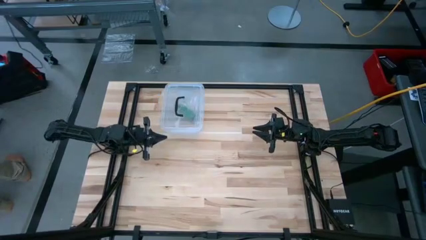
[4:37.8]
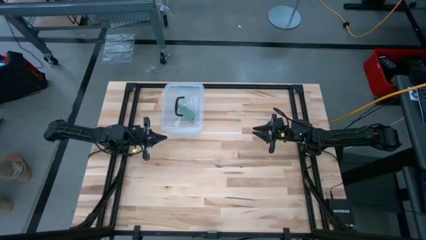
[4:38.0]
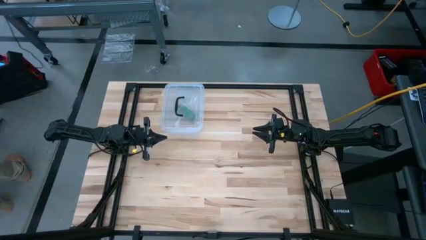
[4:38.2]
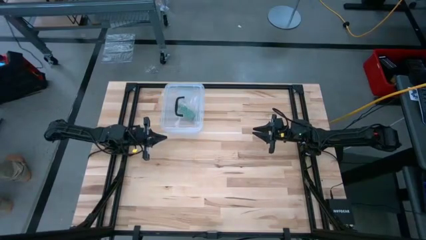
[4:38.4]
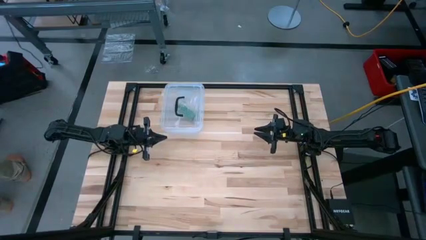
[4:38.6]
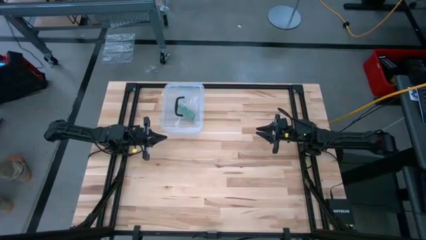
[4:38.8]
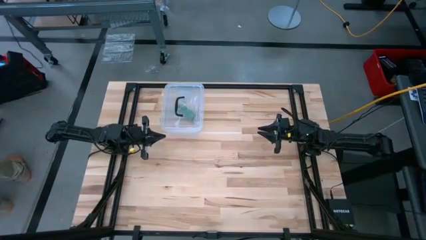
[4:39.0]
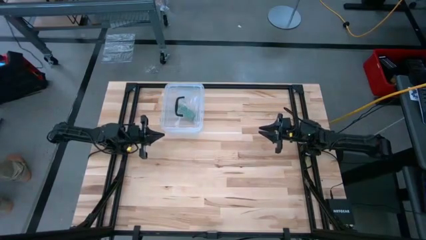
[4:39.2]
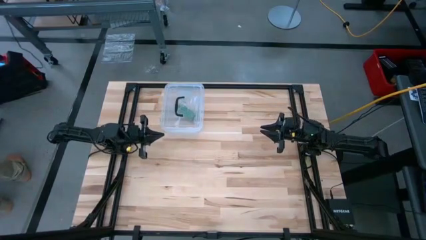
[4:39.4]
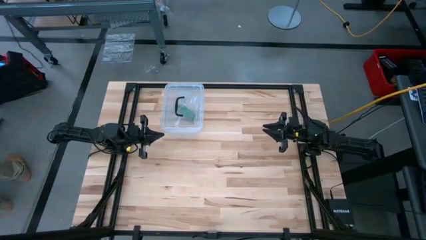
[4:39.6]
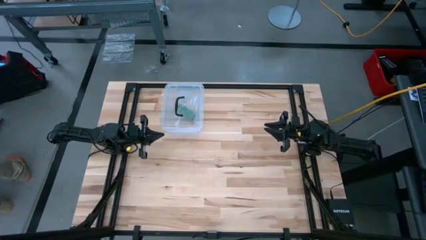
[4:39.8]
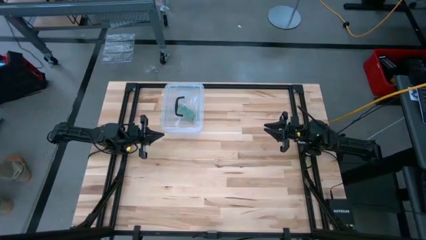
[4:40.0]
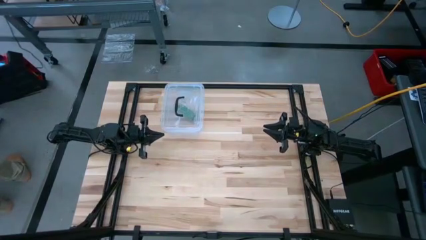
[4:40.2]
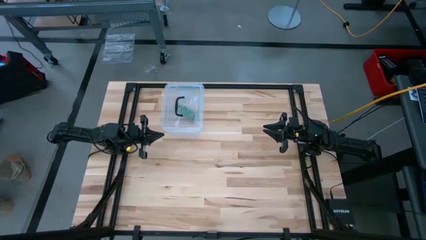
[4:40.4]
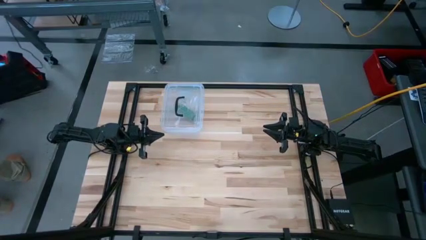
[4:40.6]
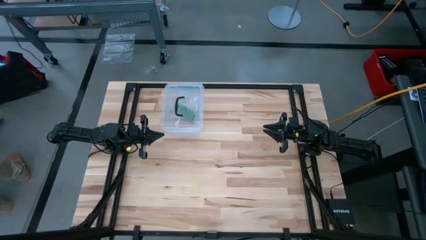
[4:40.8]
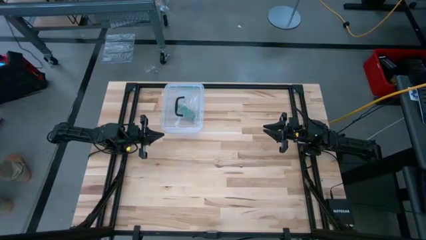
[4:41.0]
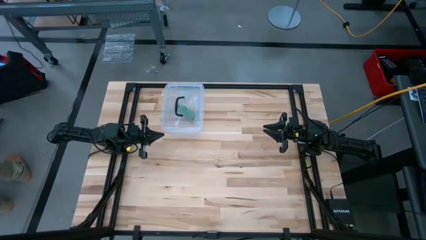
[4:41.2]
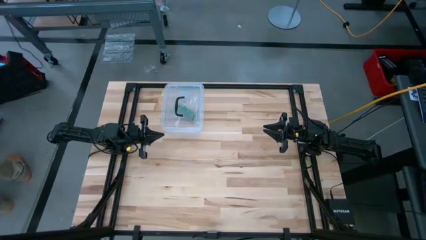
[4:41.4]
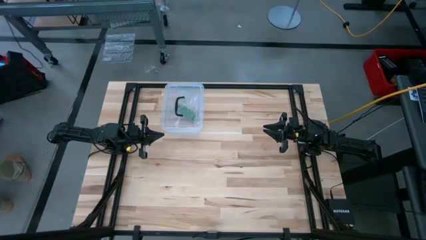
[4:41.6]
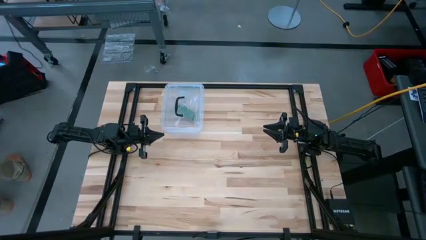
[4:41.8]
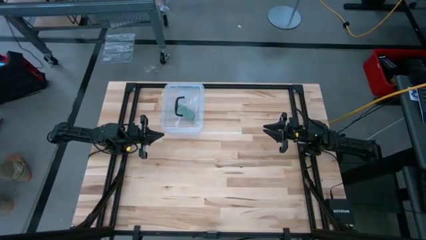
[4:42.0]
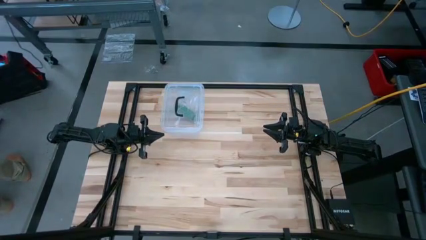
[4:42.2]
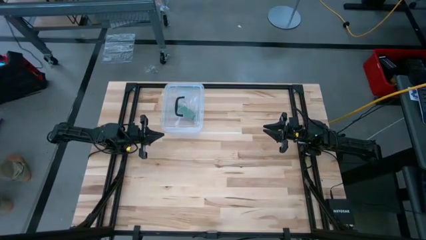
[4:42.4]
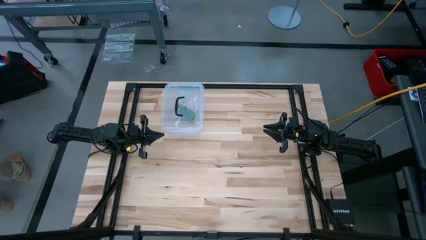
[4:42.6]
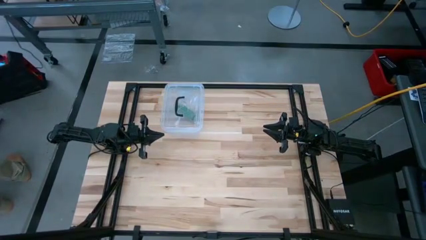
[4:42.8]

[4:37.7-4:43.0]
Task: Roll bandage
Return to Home Position

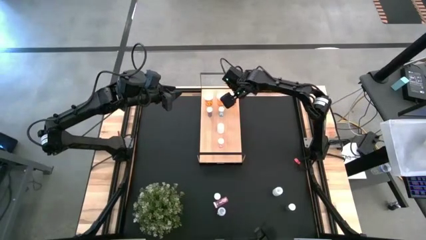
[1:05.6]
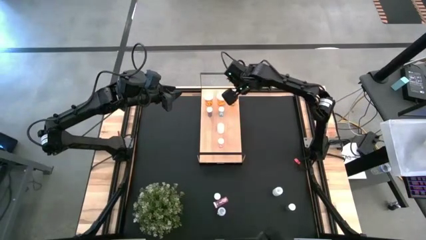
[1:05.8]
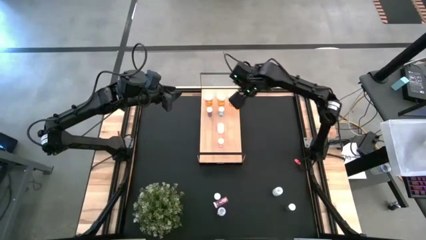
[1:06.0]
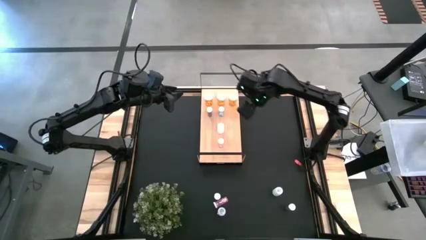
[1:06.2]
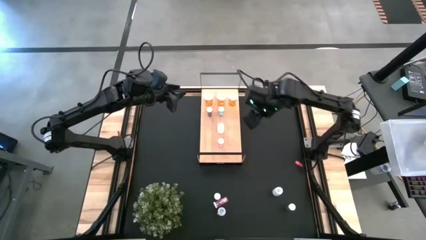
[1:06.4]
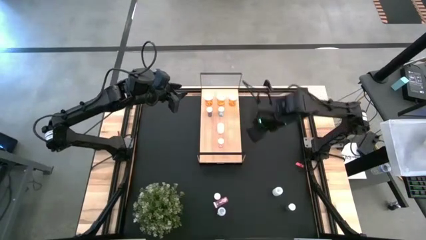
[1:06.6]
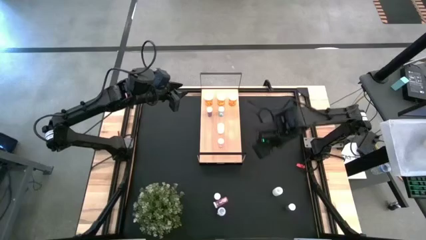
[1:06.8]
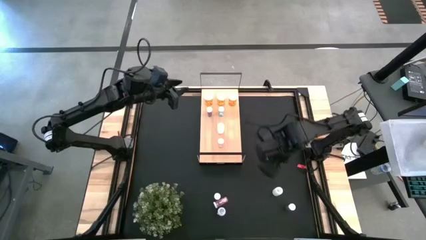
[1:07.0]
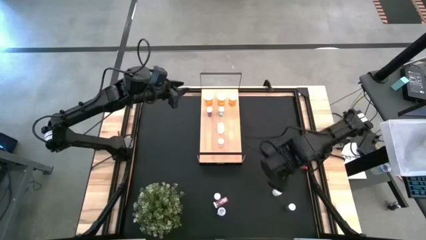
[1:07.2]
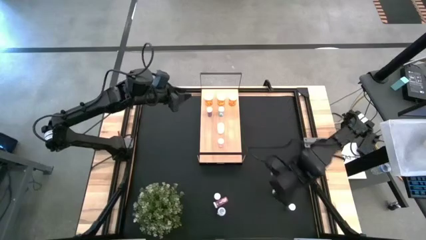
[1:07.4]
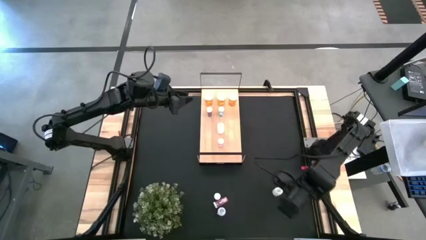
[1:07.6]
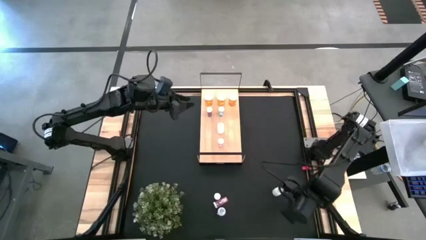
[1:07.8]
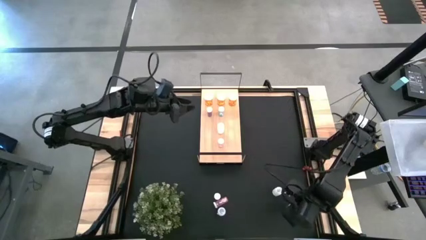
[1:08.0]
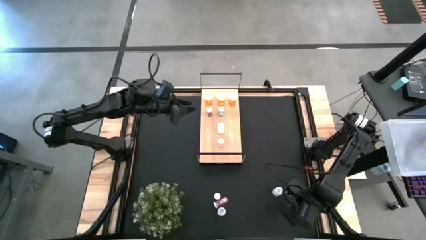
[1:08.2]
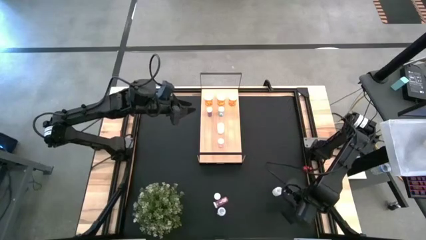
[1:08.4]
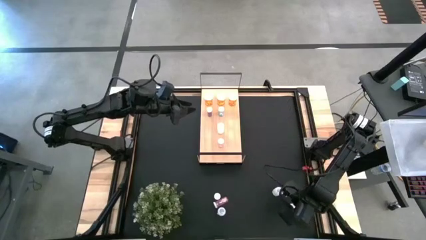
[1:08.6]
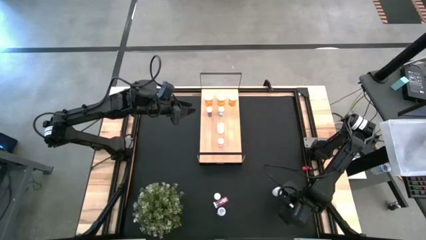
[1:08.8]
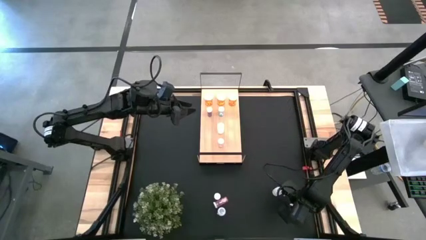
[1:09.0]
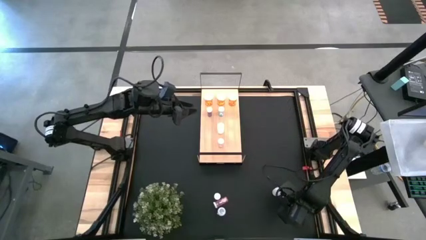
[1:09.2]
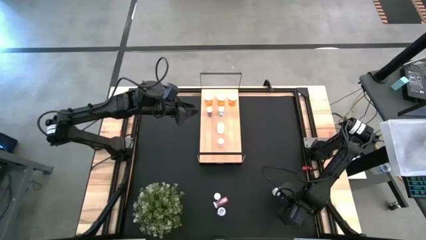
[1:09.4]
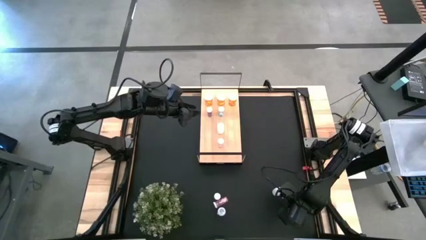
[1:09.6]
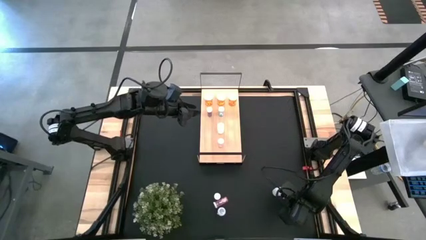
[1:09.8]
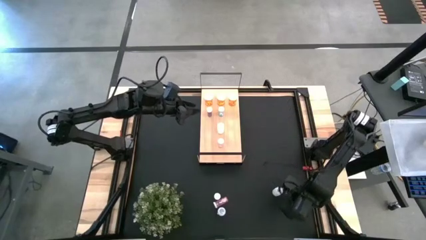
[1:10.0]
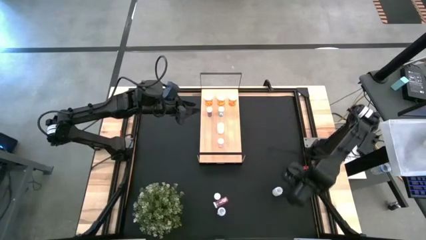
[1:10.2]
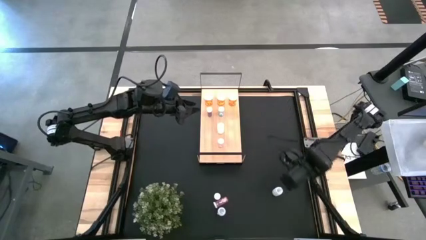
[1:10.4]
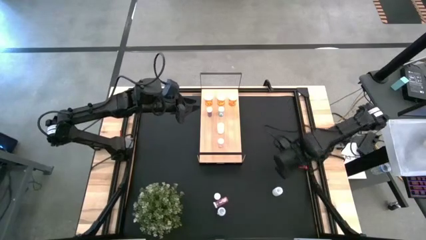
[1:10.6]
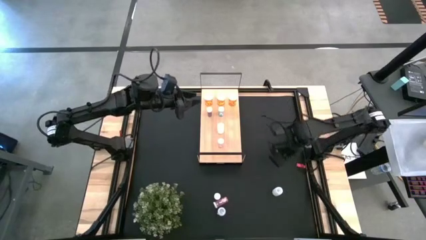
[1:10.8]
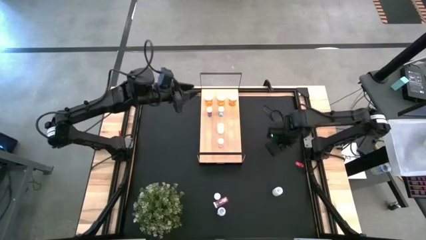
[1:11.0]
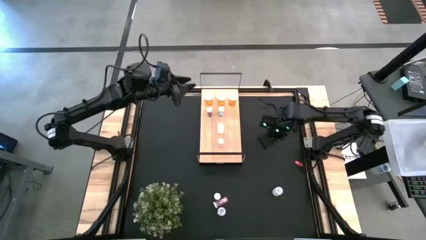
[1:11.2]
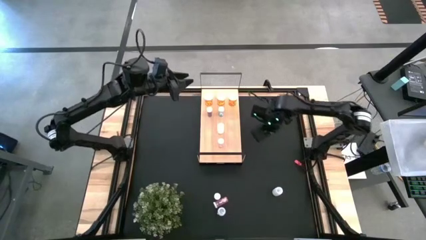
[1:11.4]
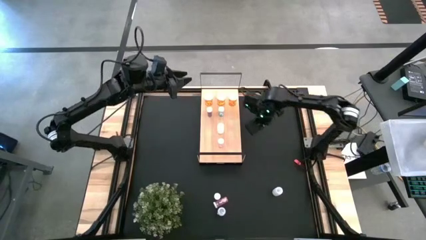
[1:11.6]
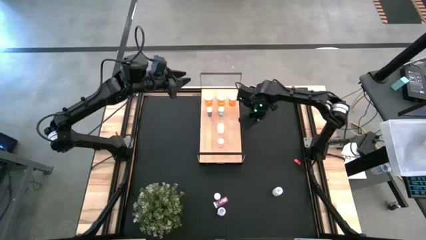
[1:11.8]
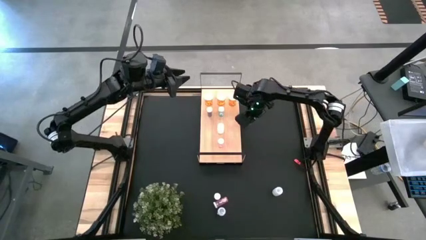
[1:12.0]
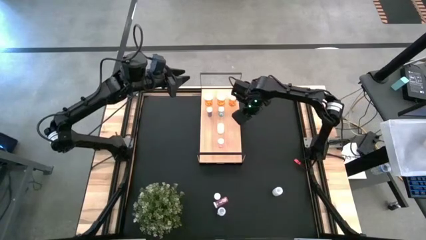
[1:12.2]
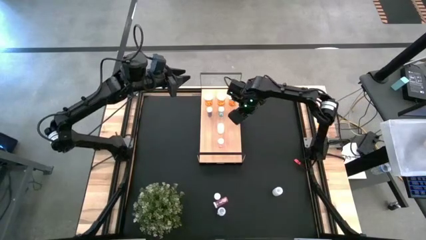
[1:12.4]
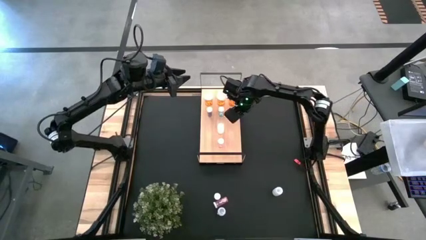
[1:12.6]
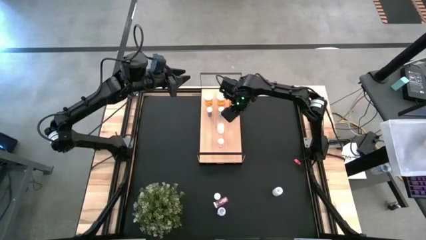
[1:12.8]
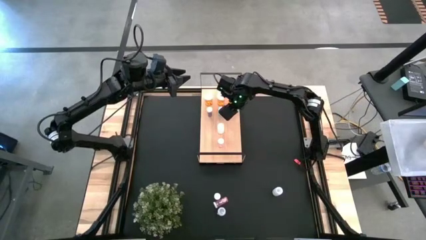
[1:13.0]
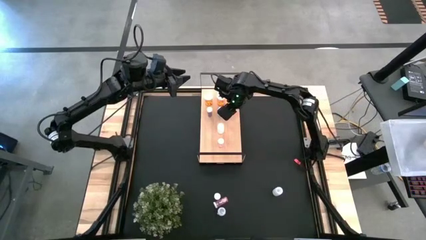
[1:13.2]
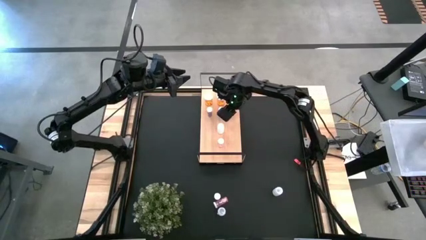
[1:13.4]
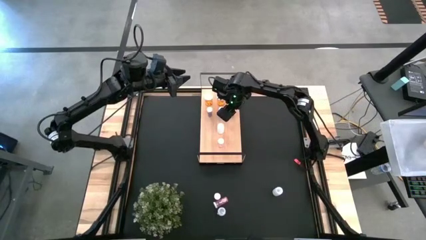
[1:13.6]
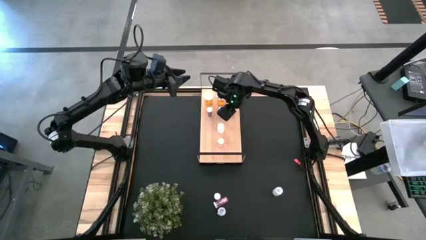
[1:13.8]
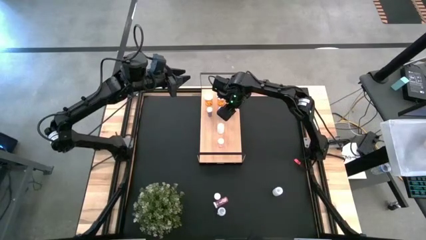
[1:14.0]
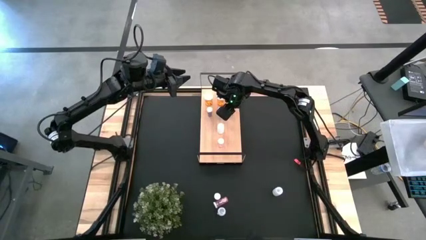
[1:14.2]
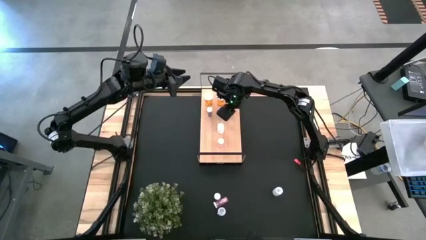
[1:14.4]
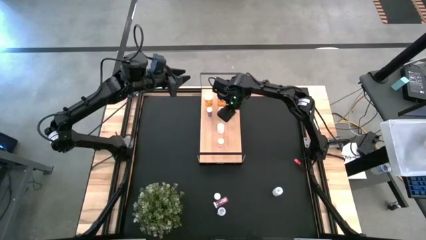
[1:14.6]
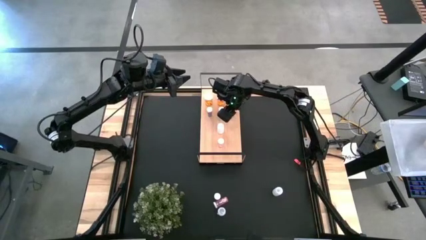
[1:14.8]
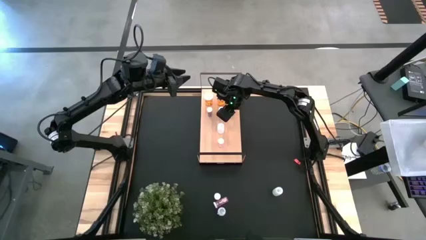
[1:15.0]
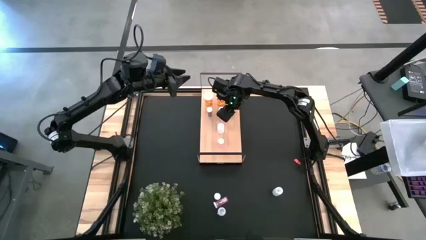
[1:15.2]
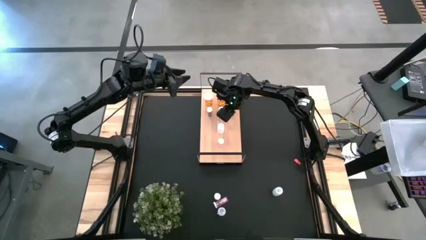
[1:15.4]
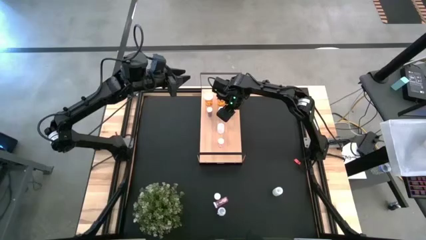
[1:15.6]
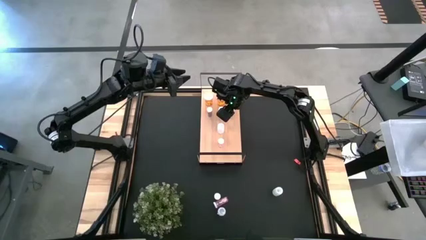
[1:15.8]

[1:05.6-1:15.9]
Task: Pick and place medicine bottles onto shelf by color
Put the blue pill bottle aligned with the other blue pill bottles on the shelf
